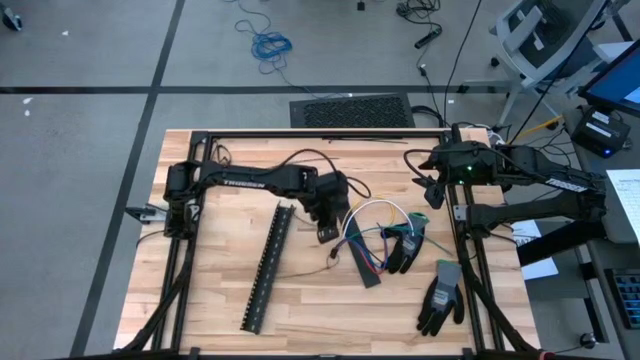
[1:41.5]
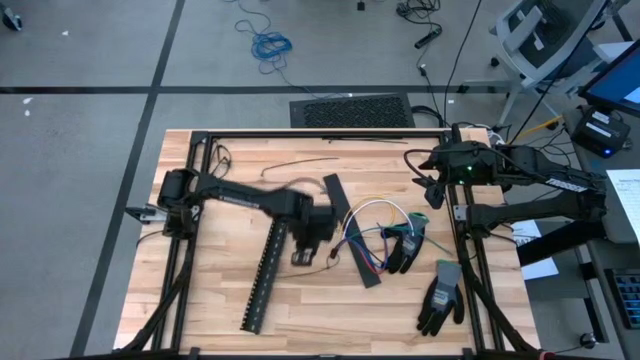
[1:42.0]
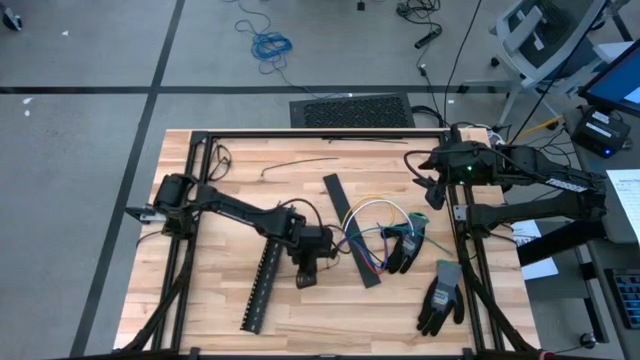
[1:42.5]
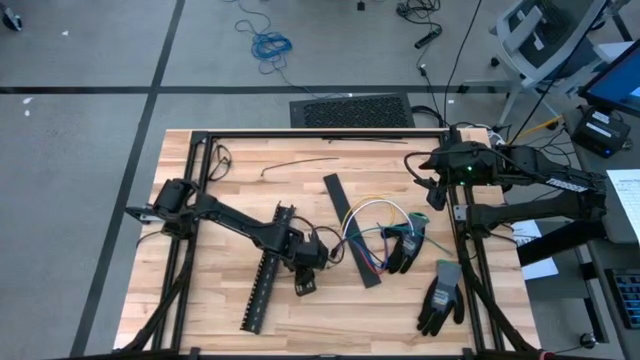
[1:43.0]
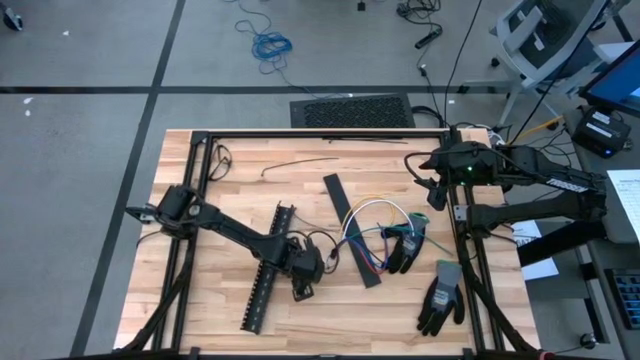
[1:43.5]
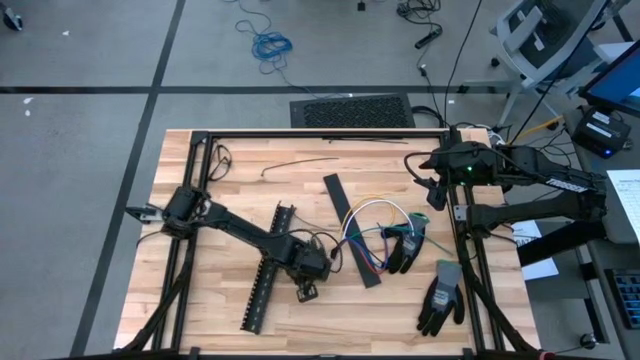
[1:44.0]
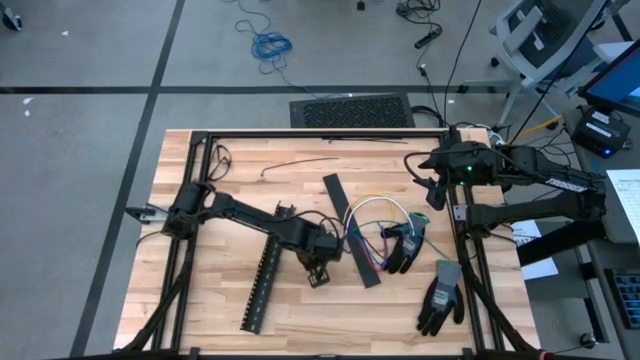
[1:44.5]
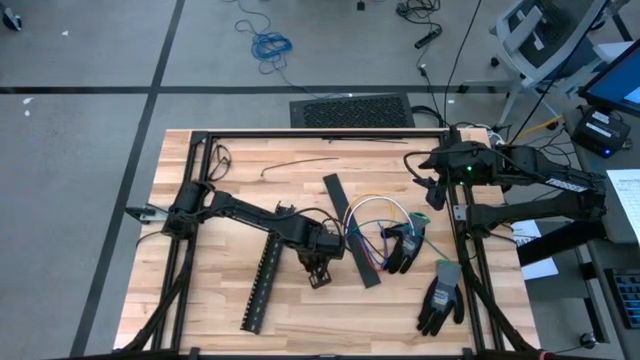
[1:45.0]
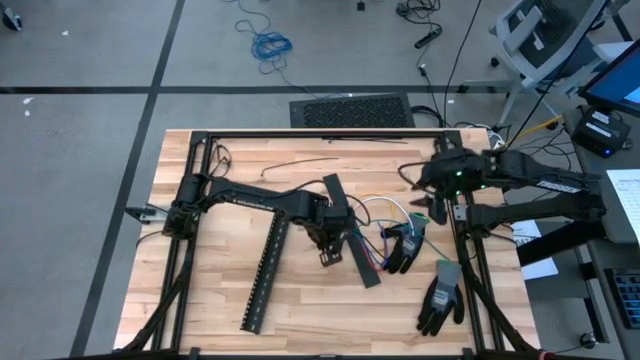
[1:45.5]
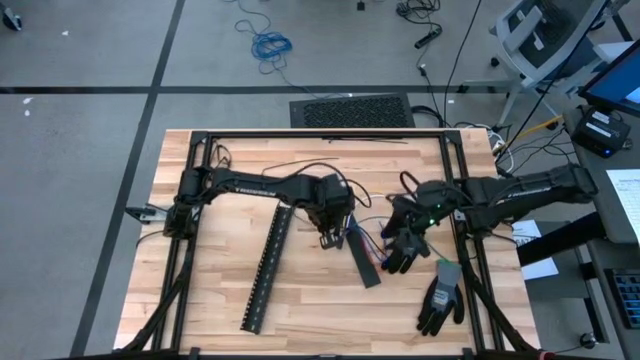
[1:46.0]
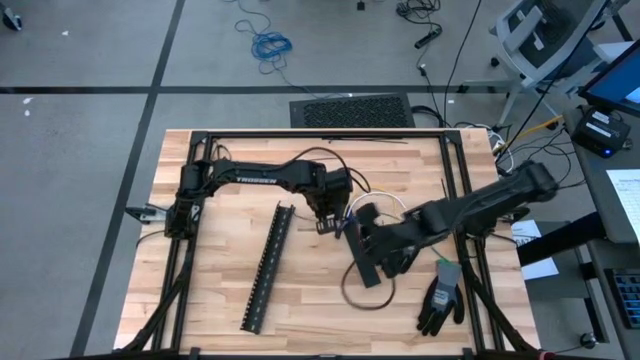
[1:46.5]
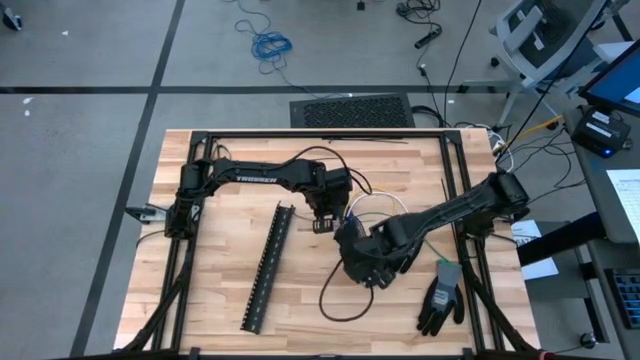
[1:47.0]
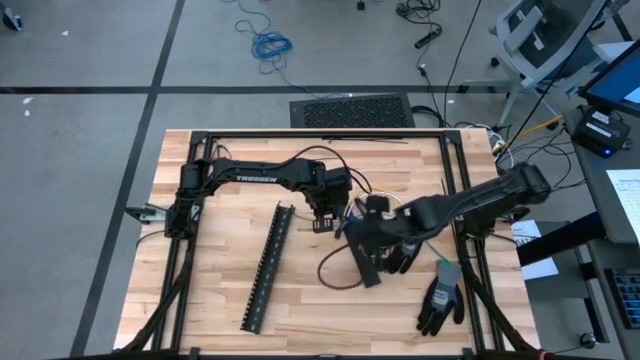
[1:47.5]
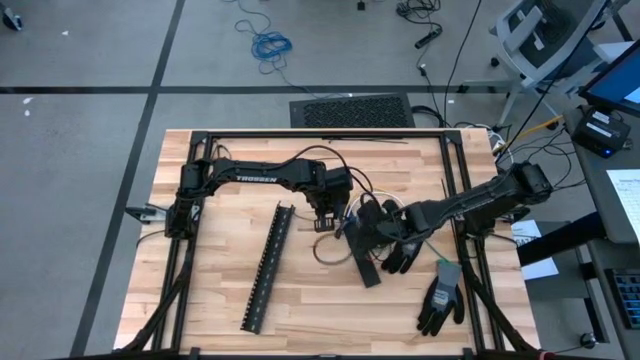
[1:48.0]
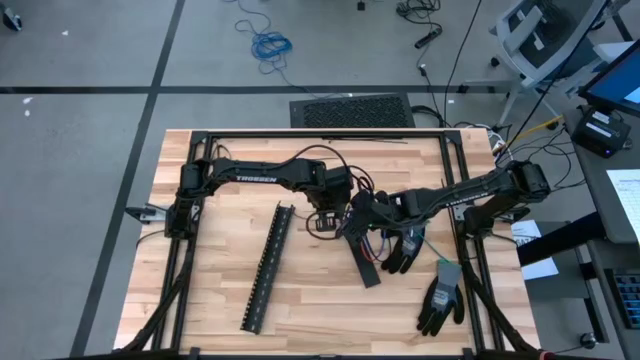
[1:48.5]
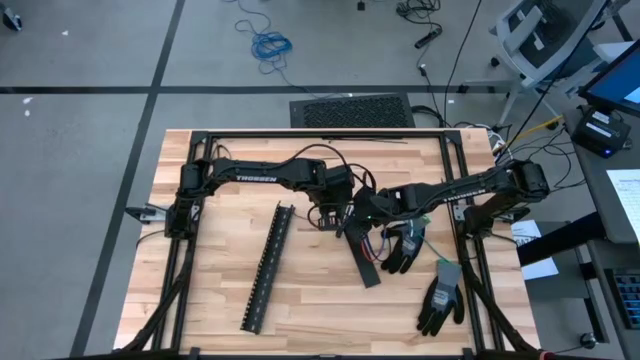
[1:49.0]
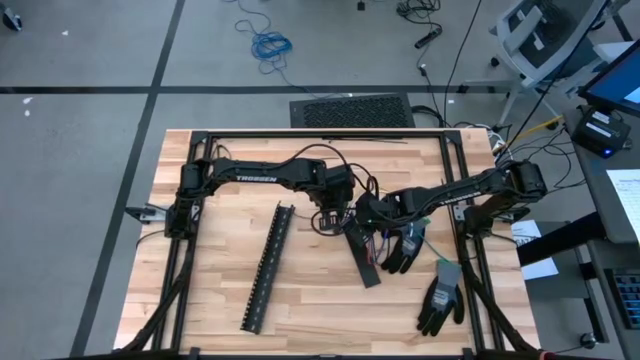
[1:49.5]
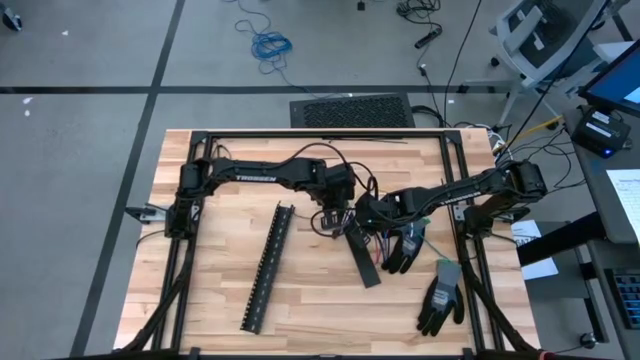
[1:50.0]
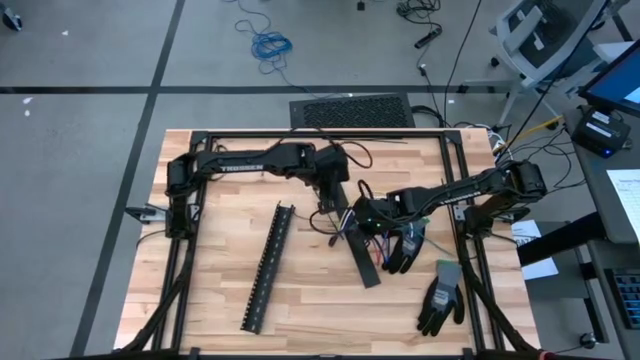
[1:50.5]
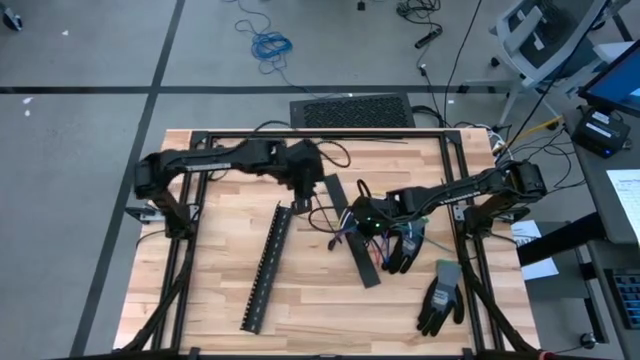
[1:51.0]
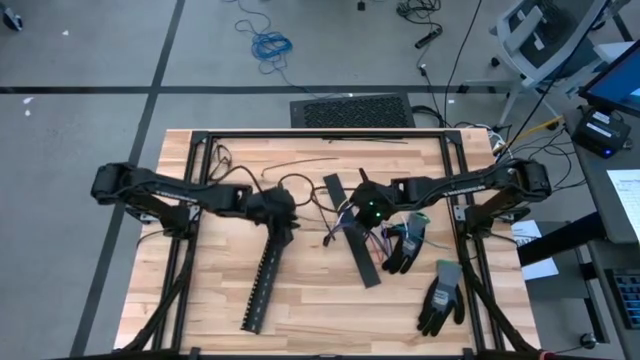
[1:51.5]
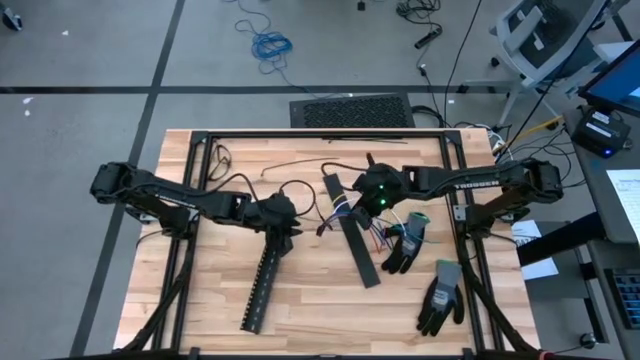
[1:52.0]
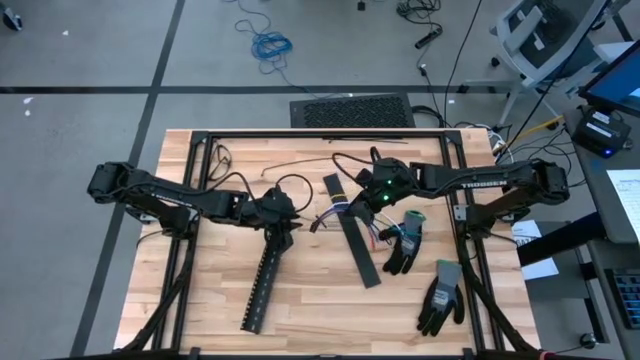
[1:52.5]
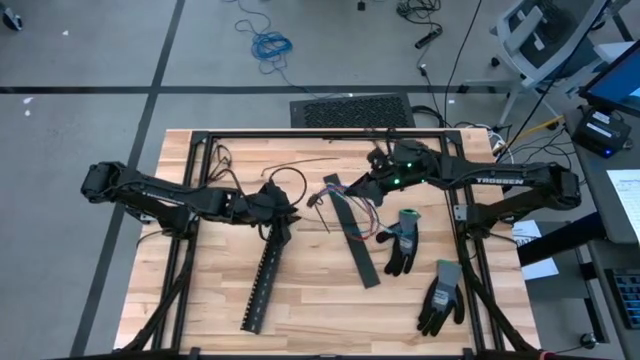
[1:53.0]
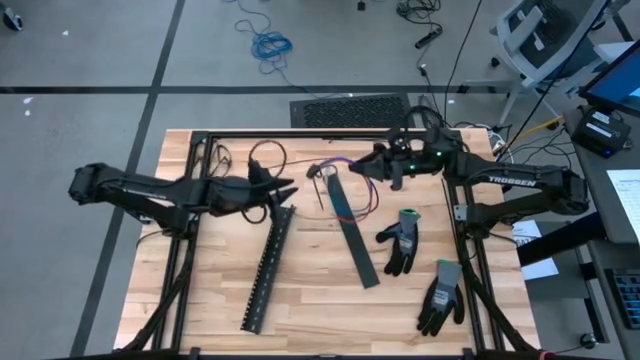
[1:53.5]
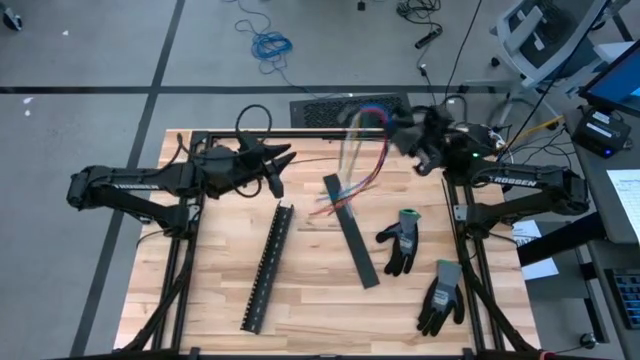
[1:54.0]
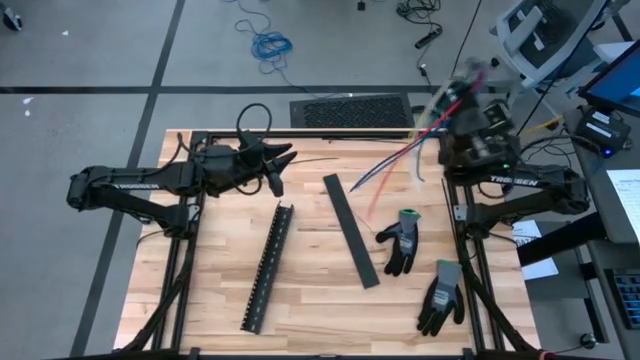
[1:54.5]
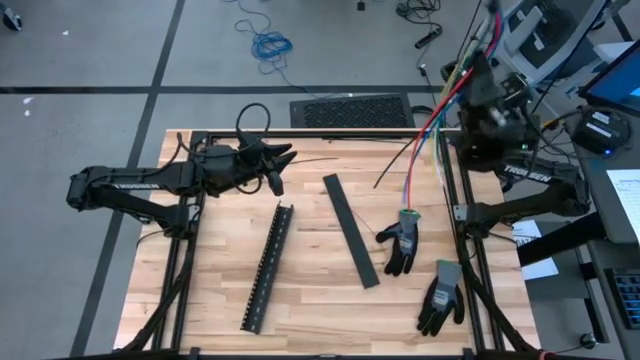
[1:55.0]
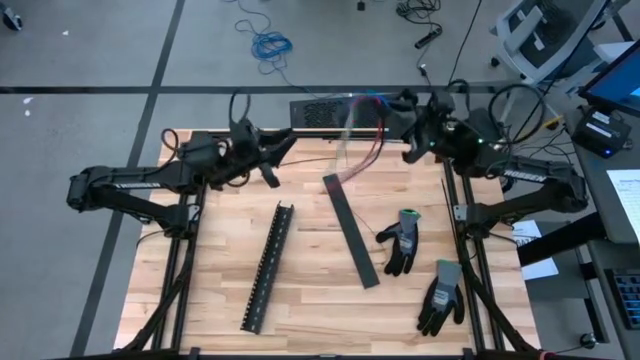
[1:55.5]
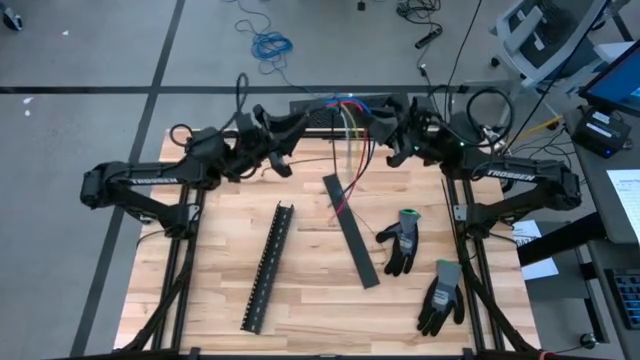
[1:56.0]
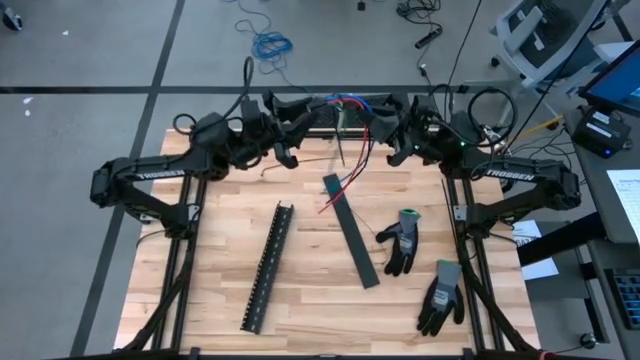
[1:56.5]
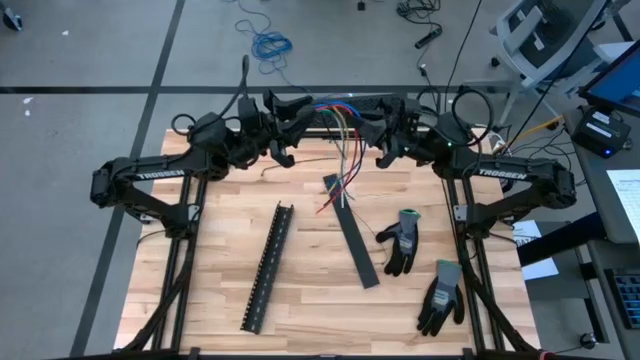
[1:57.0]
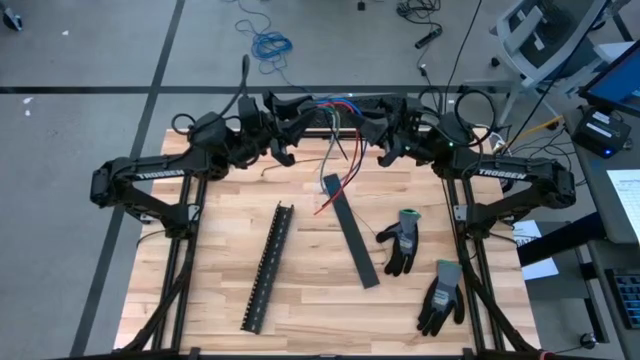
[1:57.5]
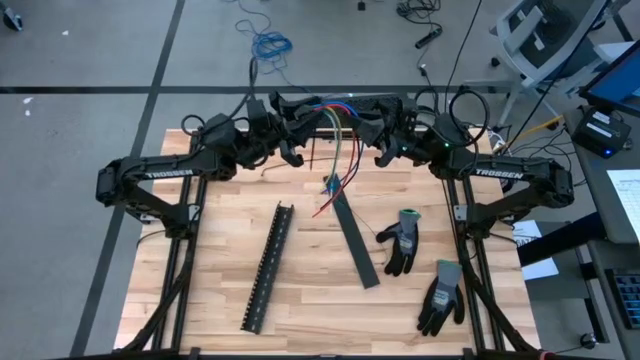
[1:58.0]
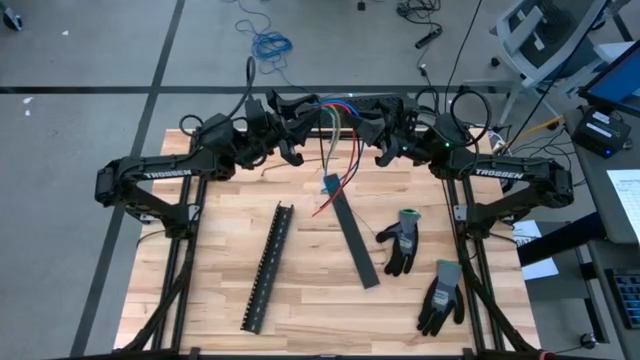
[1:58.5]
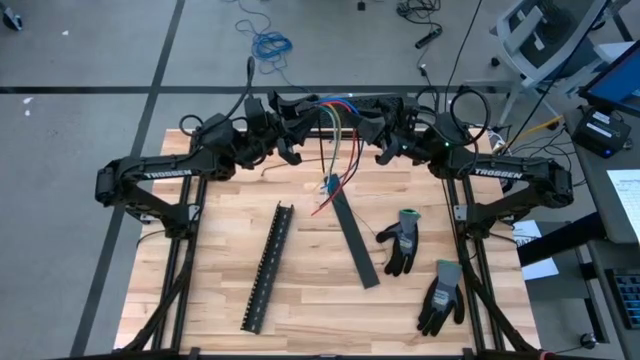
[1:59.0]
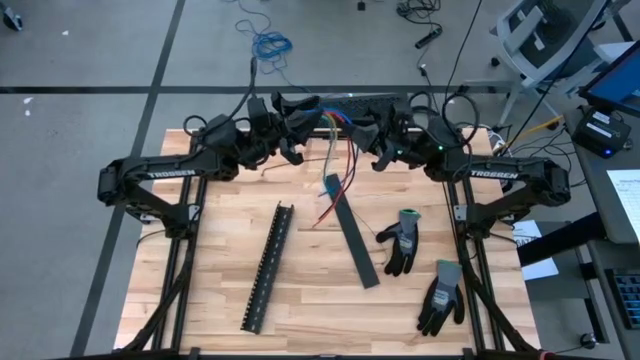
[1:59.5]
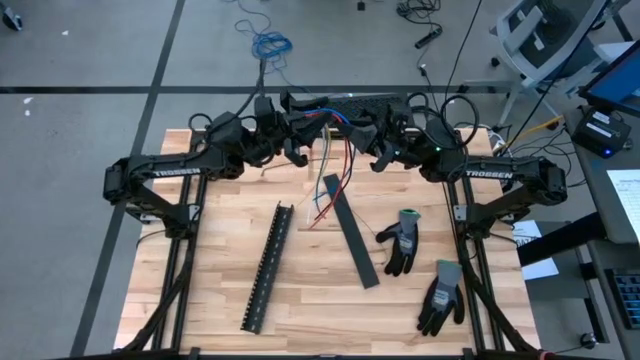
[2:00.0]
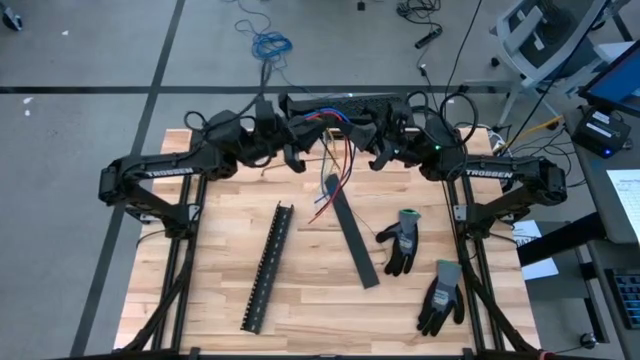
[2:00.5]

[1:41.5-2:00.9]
Task: Ziptie cables
Wrap the black zip tie on the cables

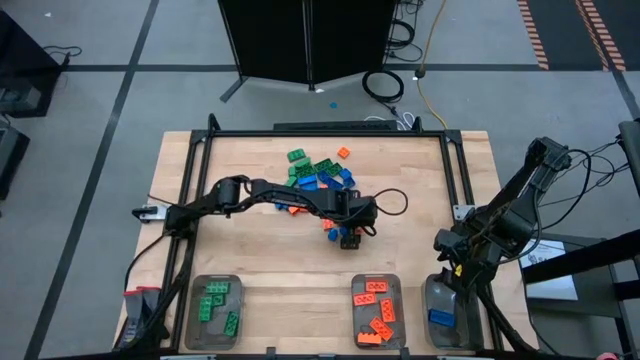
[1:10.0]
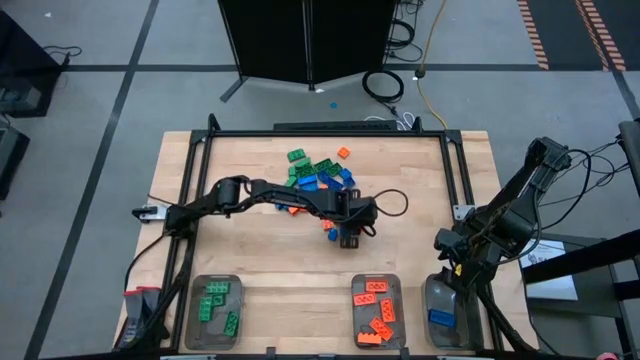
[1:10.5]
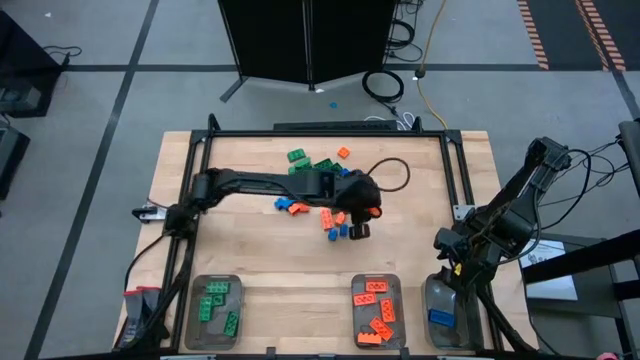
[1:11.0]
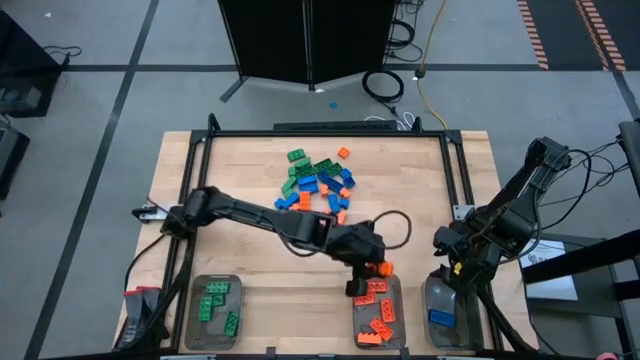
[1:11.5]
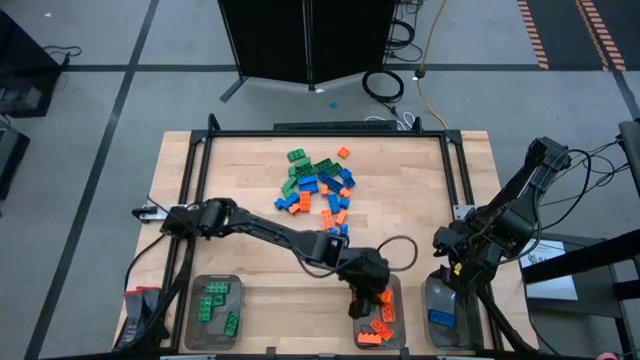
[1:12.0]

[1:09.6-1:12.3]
Task: Sort blocks
Put the orange game piece into the center black bin

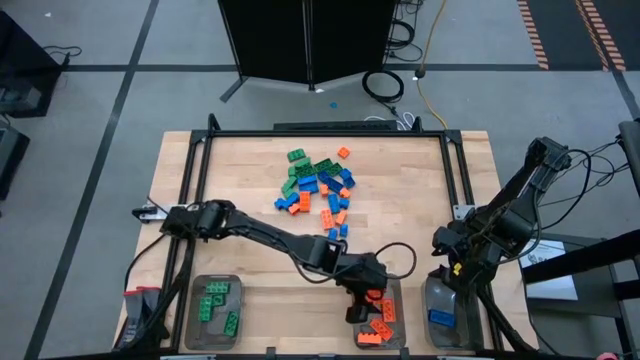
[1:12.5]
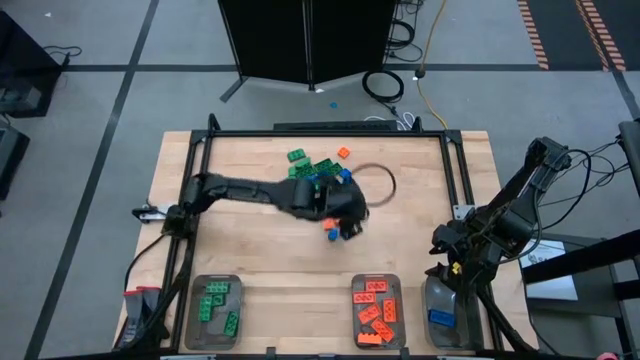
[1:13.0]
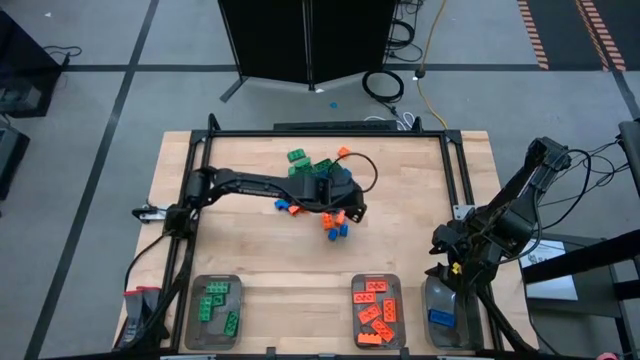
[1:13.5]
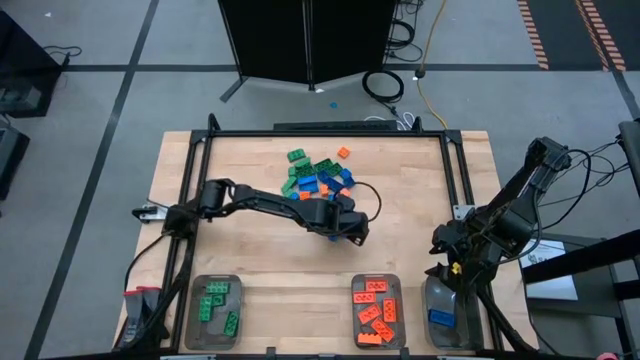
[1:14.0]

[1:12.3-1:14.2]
Put the orange game piece into the center black bin
